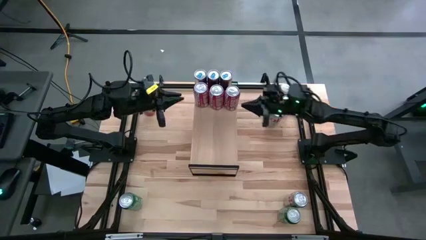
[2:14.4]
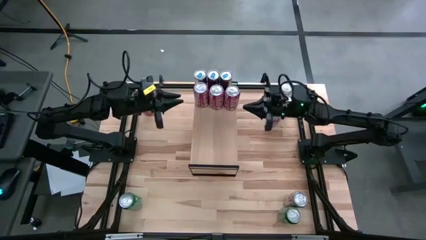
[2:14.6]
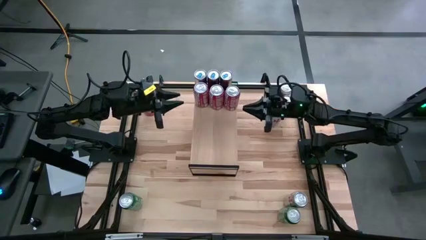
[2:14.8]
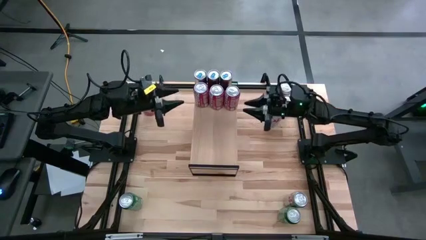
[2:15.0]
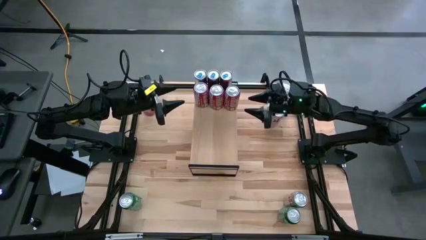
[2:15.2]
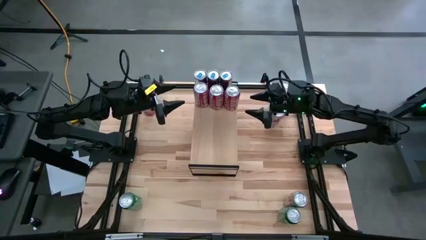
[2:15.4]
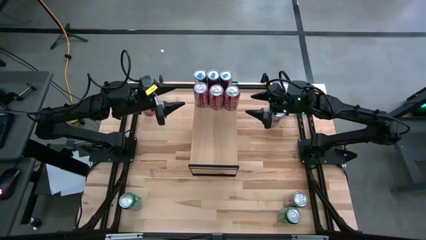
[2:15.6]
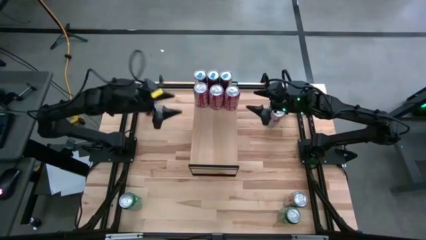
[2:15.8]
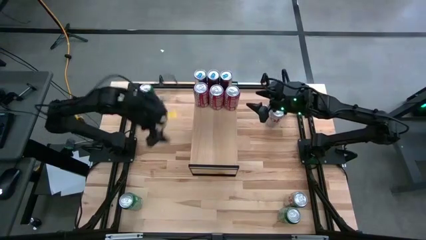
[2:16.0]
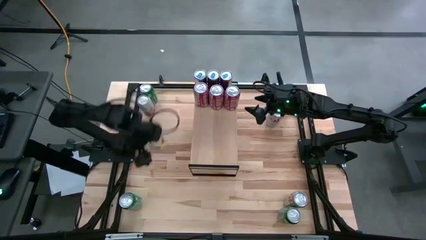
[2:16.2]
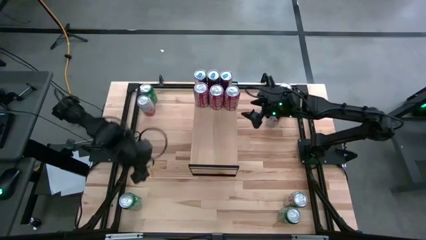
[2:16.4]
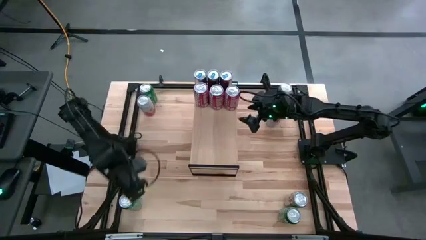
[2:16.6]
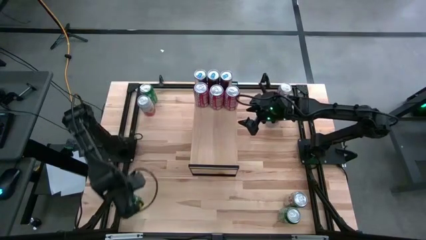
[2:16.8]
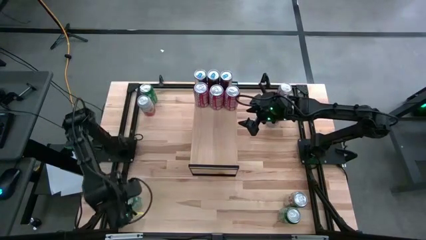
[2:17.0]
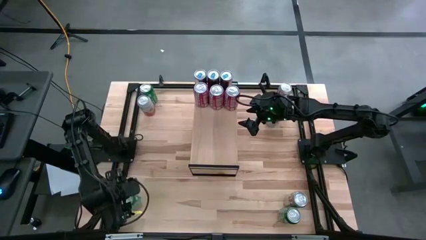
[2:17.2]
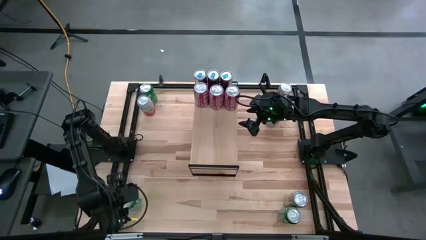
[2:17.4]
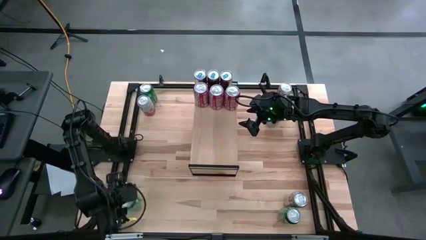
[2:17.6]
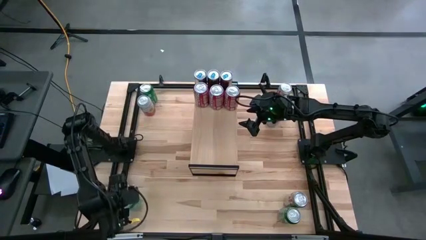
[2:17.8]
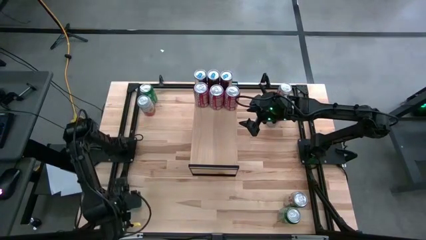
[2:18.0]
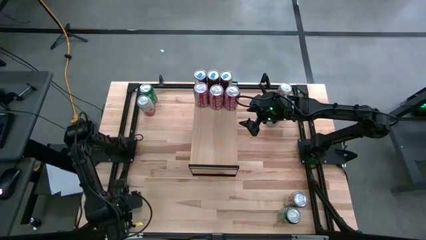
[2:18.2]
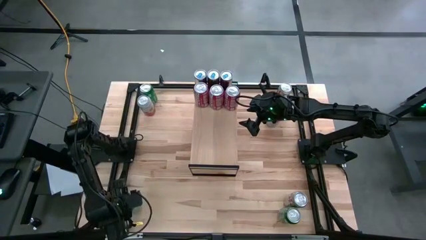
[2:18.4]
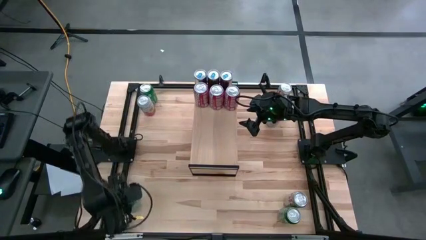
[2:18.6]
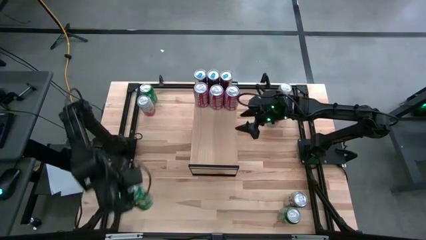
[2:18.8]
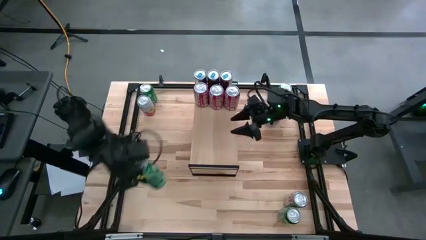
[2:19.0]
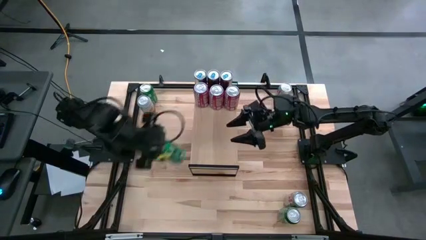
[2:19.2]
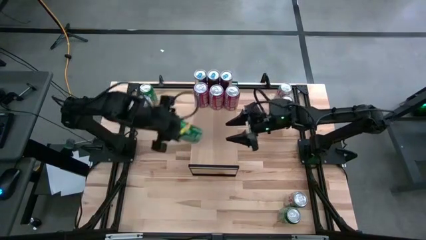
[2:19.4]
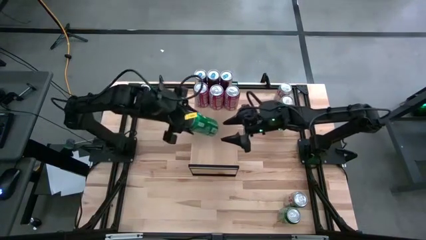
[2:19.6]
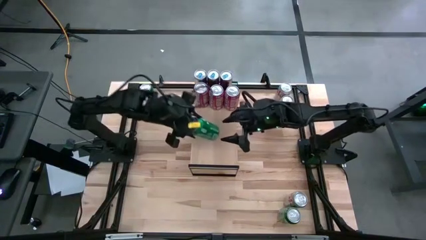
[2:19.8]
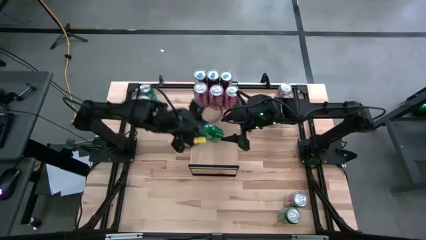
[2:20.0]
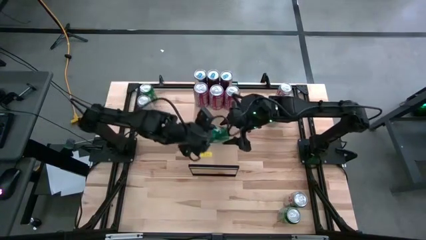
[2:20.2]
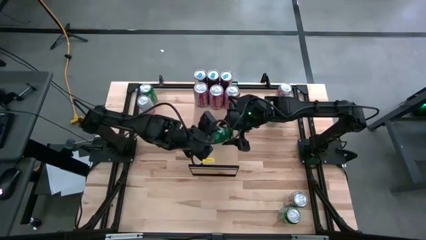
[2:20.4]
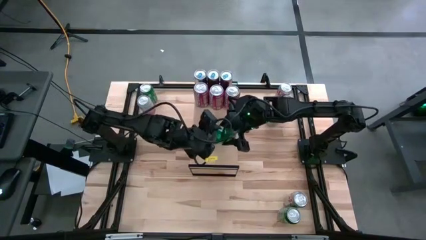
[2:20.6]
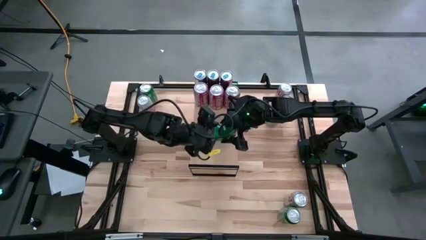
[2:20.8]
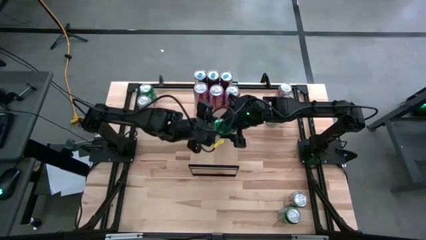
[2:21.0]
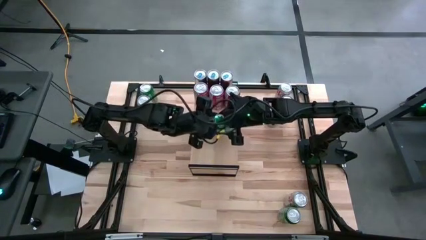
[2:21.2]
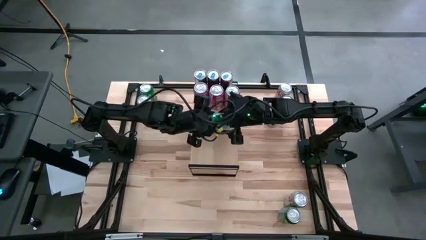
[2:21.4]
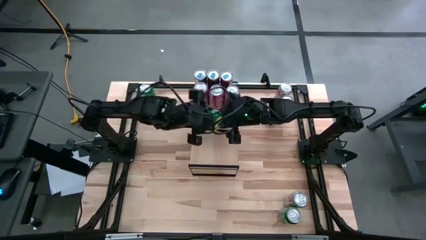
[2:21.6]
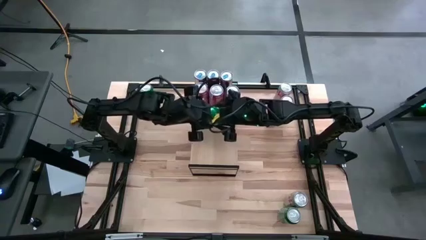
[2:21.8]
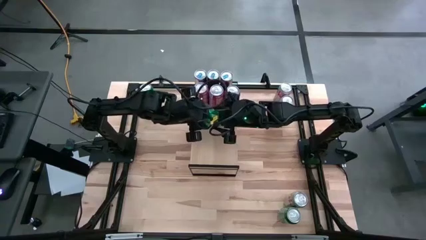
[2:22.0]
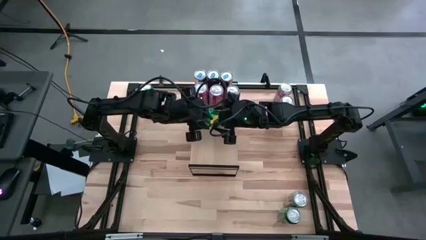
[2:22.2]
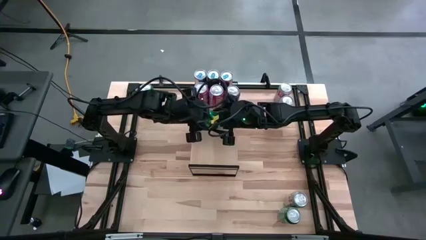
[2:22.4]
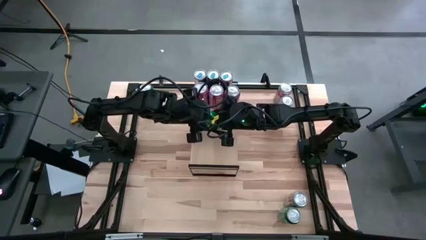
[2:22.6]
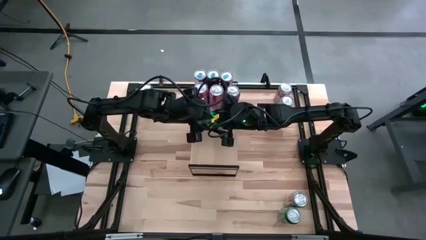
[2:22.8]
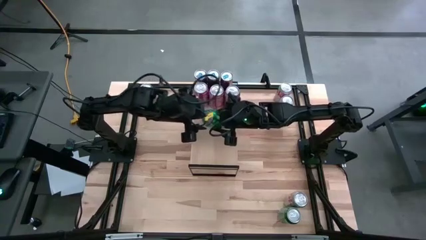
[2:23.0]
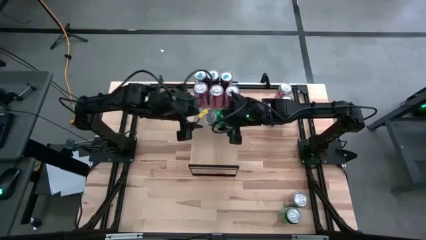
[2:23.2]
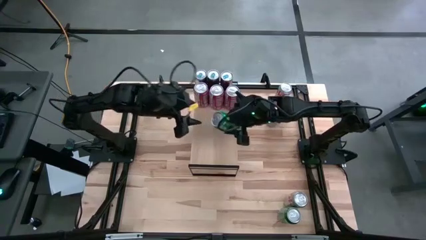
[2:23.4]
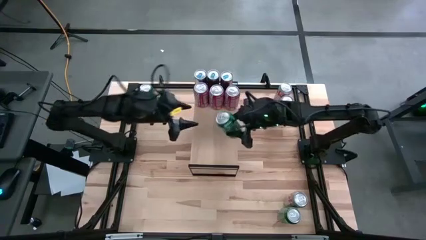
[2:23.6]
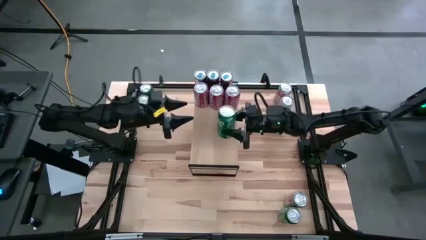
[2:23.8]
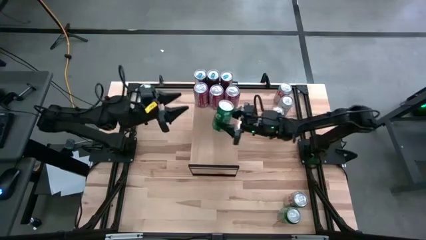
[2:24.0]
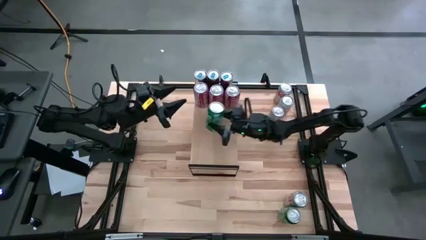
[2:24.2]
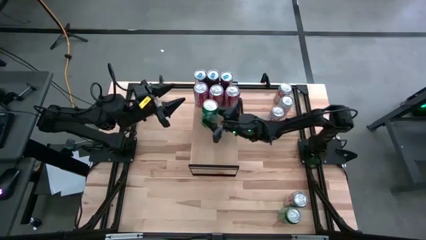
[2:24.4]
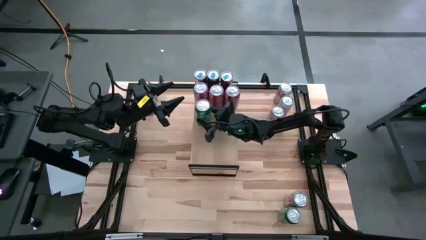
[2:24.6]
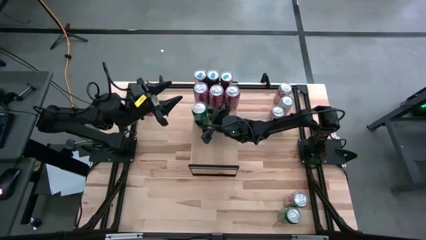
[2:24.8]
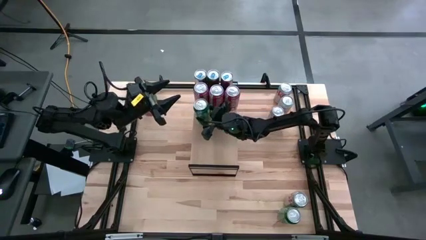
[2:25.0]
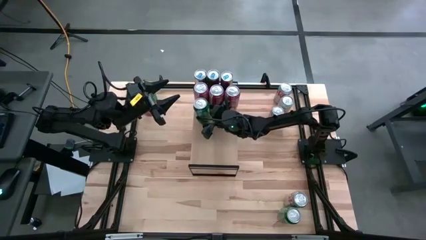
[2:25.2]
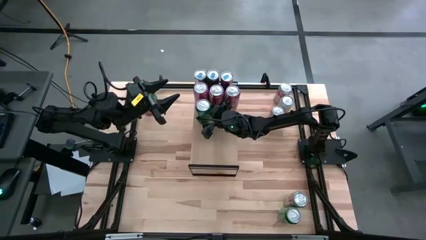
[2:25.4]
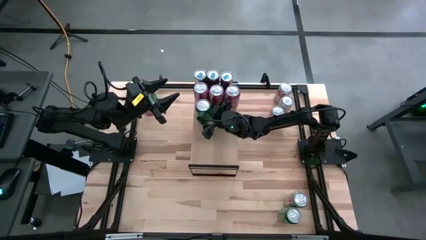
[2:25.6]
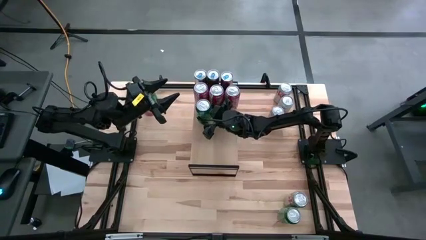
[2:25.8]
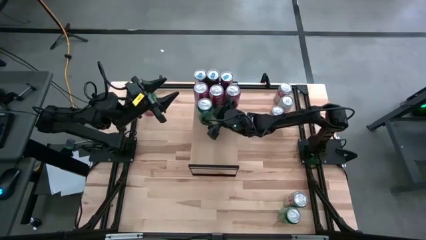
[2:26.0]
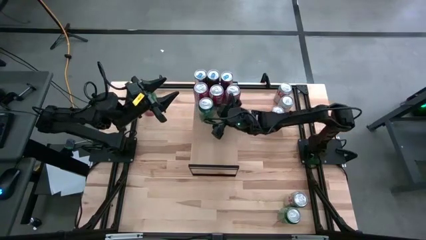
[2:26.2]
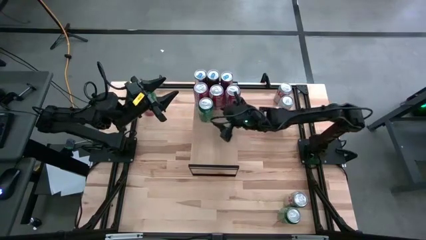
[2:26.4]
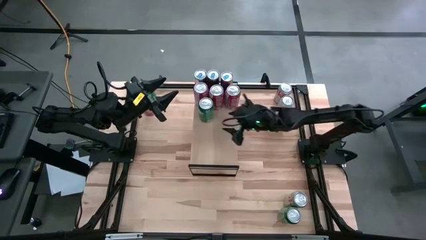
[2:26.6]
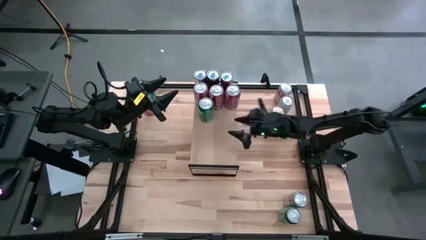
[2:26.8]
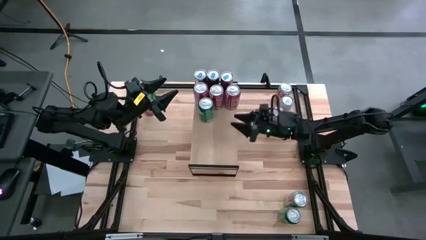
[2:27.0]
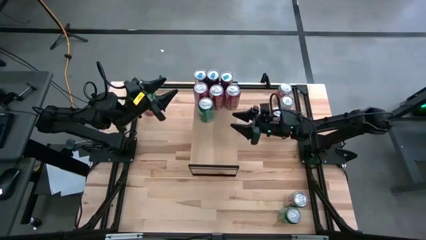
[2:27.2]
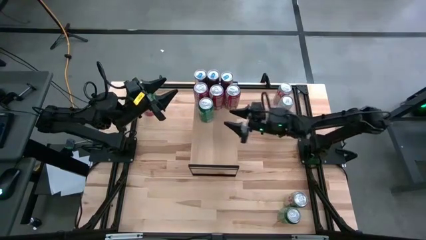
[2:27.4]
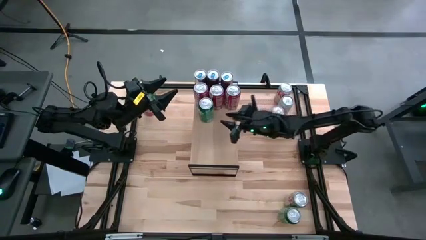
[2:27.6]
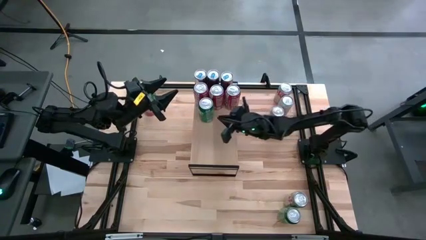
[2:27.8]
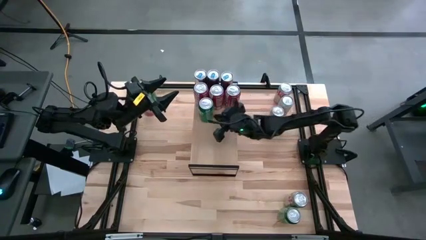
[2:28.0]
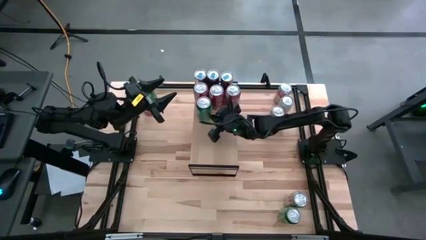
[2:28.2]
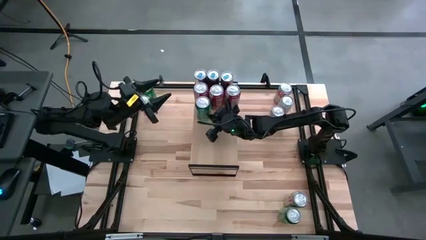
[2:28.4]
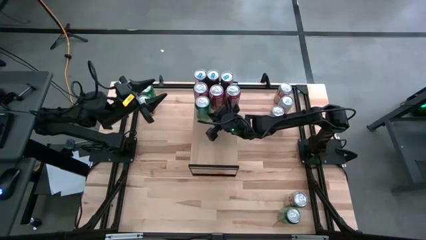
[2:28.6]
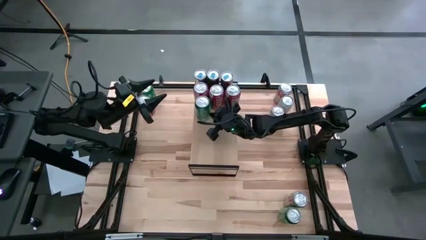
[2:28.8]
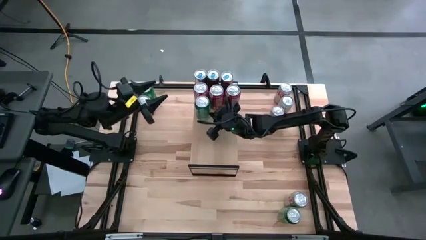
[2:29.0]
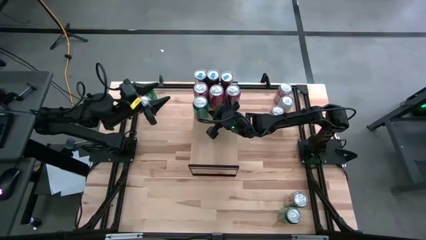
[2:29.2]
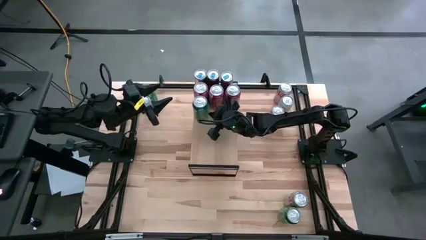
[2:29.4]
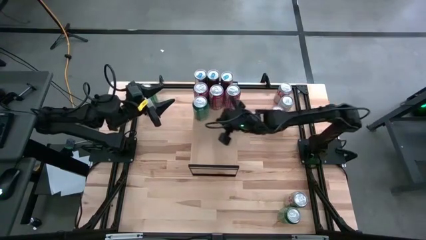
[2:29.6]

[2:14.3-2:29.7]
Task: Place canned beverage on shelf
Put the bottom left green soda can on the shelf

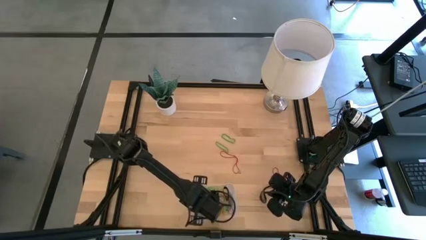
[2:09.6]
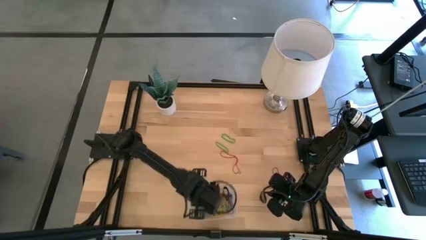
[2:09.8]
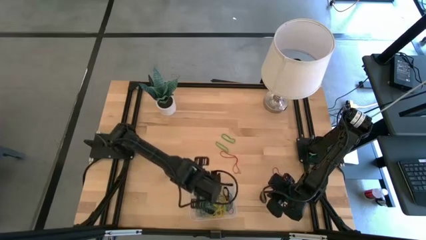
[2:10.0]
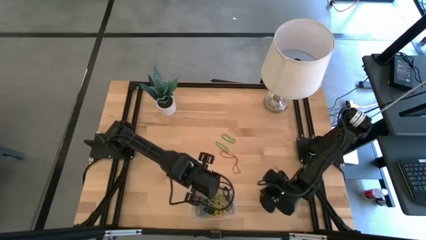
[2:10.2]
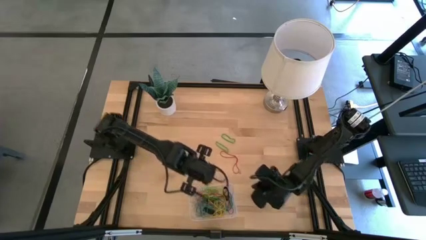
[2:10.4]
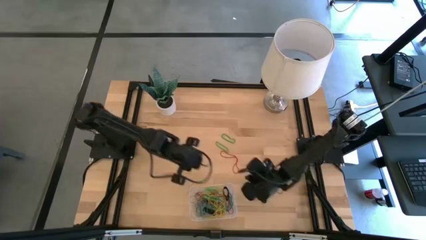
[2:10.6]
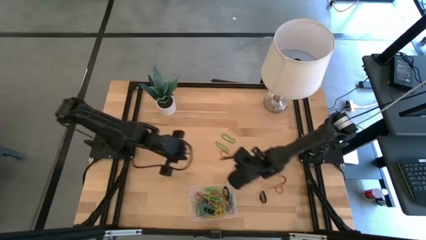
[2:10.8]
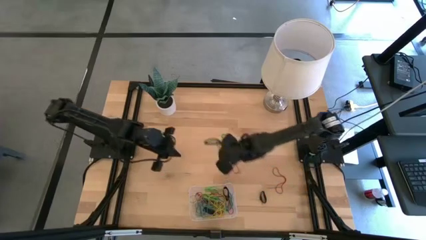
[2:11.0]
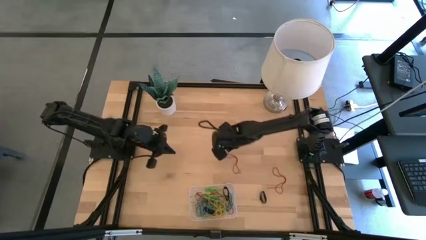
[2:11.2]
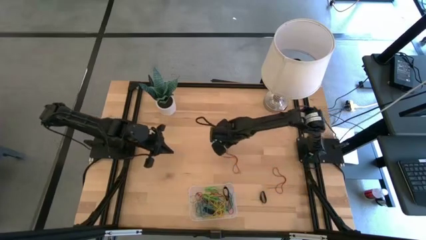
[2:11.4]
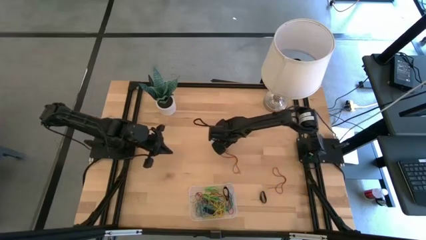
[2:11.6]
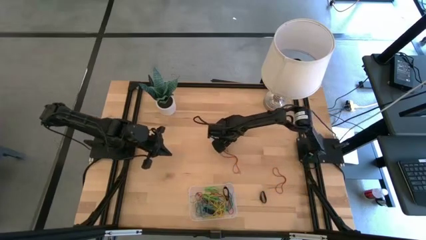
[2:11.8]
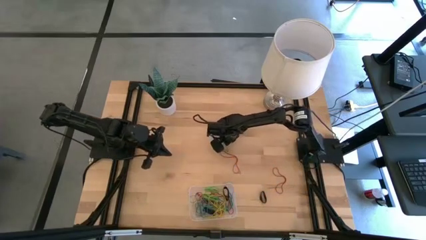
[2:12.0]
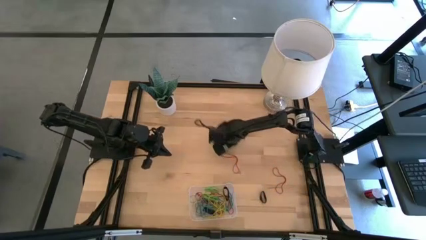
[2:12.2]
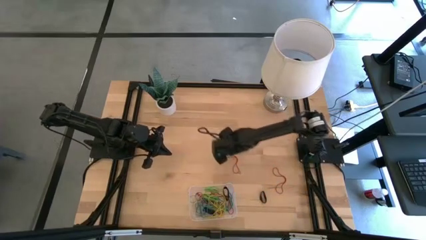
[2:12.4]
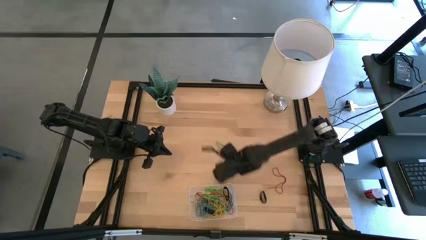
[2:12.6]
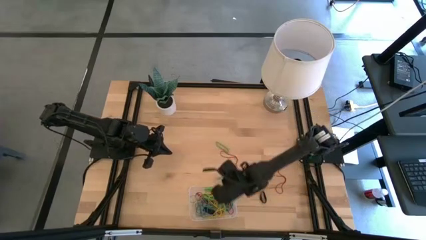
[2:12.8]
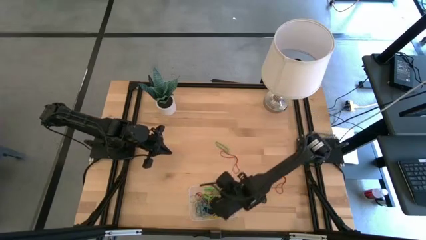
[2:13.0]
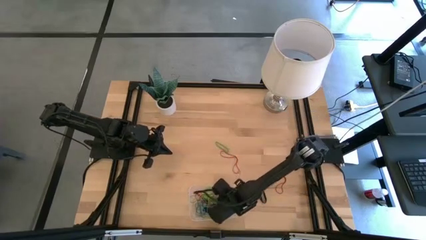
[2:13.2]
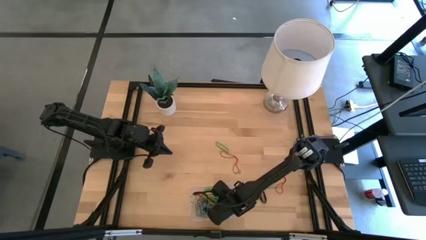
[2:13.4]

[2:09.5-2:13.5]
Task: Pick and place rubber bands into bin
Put the green rubber band into the transparent bin
